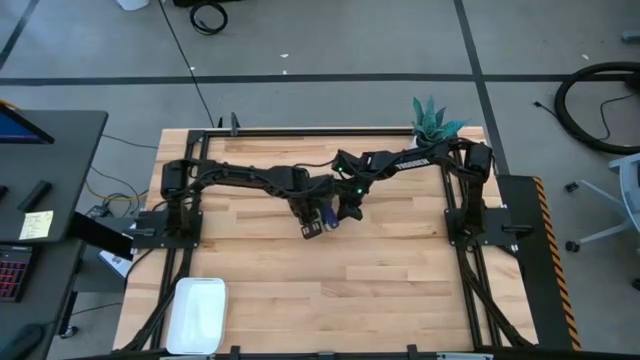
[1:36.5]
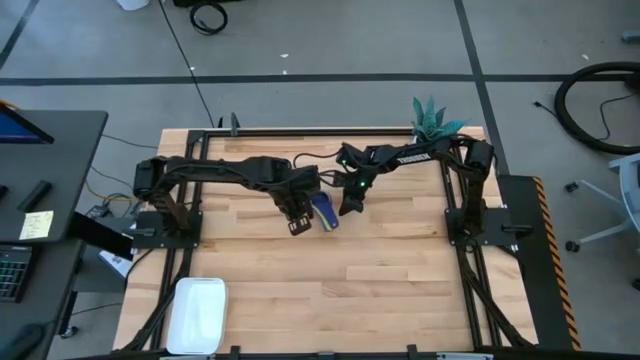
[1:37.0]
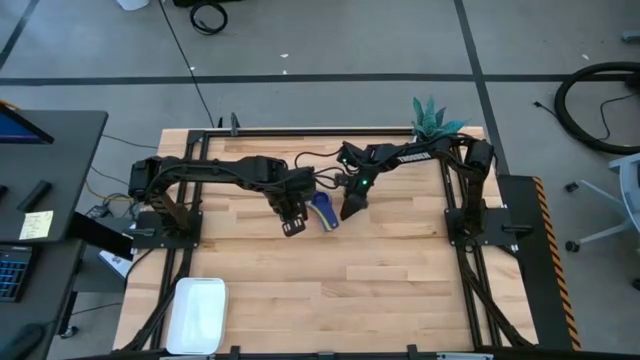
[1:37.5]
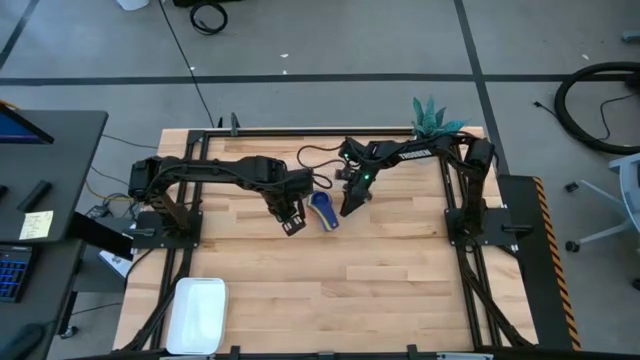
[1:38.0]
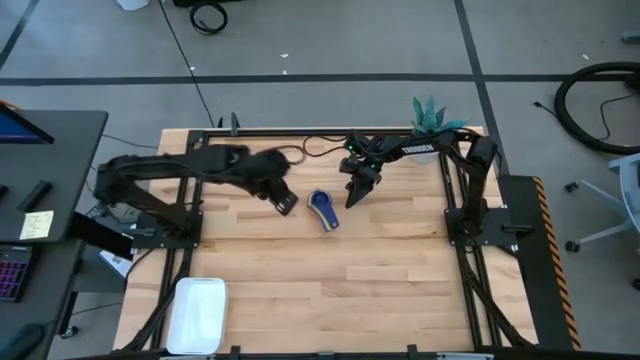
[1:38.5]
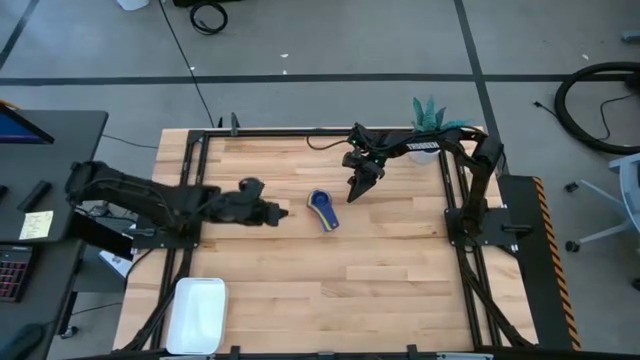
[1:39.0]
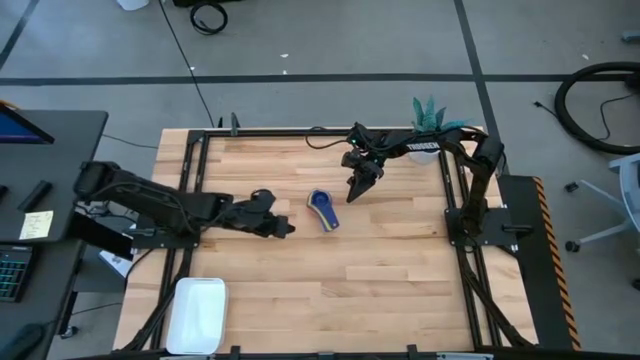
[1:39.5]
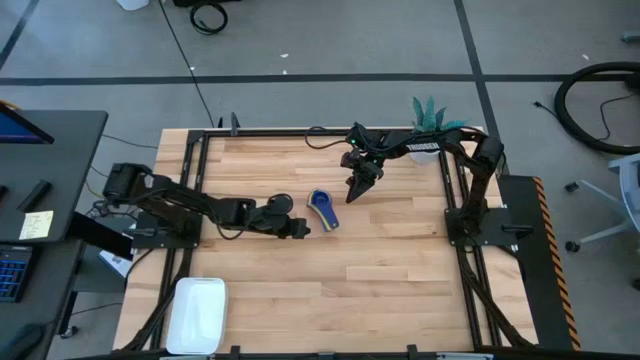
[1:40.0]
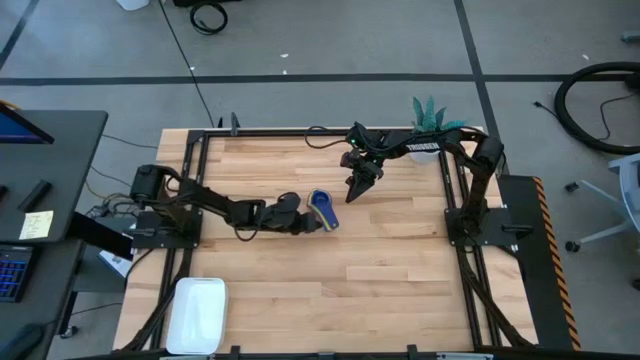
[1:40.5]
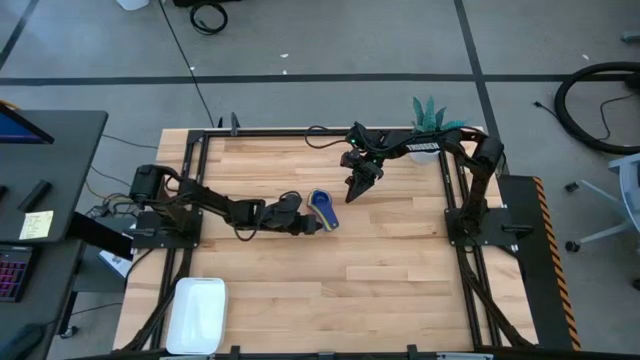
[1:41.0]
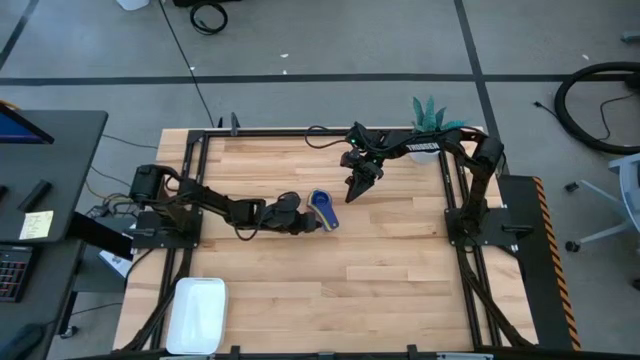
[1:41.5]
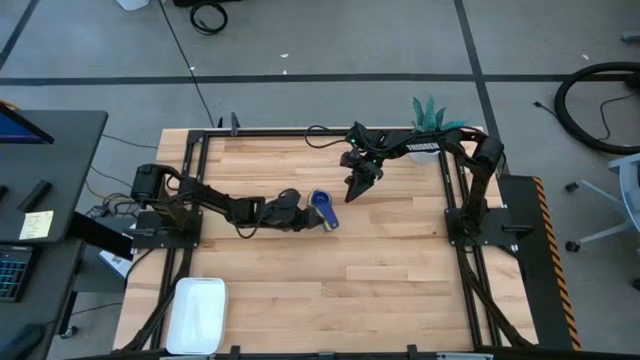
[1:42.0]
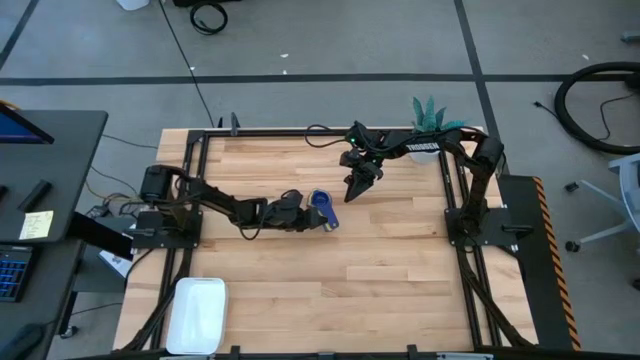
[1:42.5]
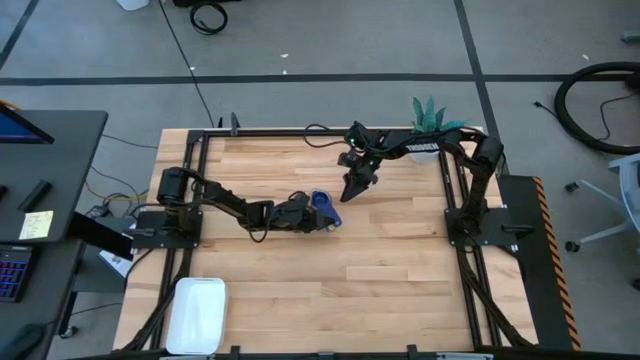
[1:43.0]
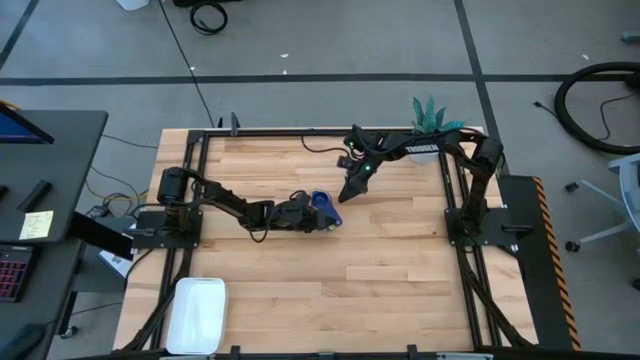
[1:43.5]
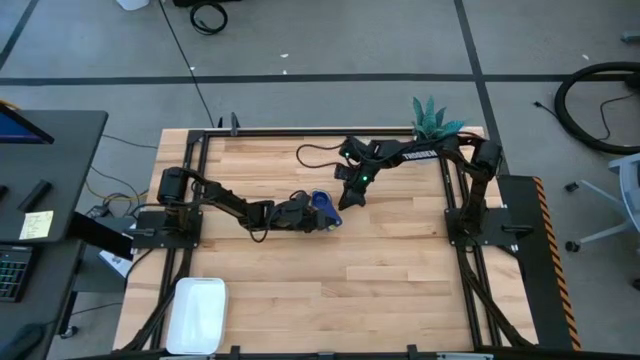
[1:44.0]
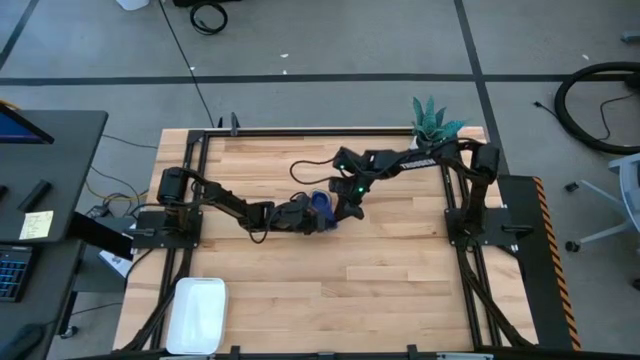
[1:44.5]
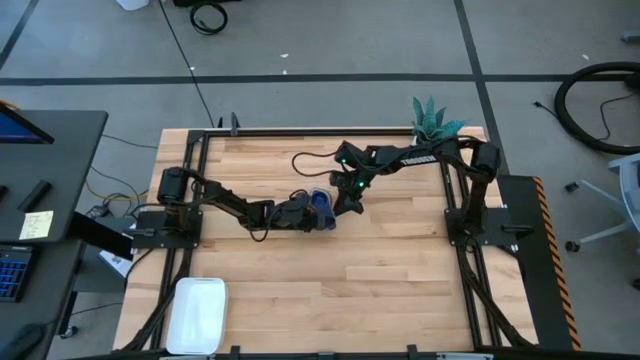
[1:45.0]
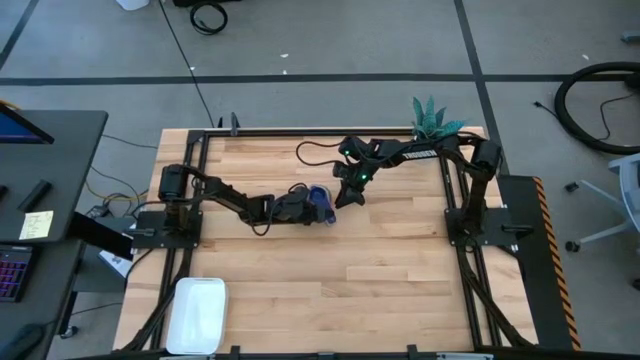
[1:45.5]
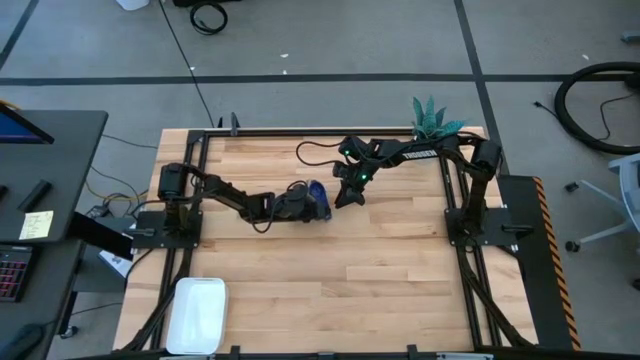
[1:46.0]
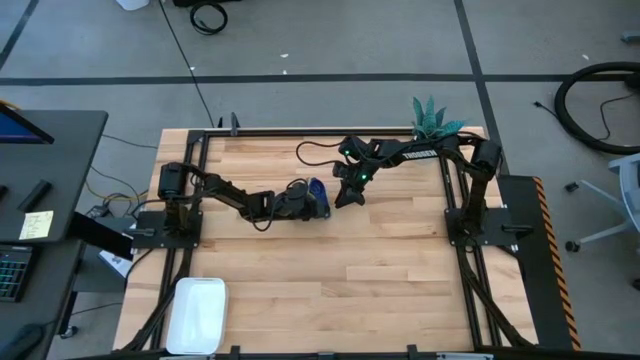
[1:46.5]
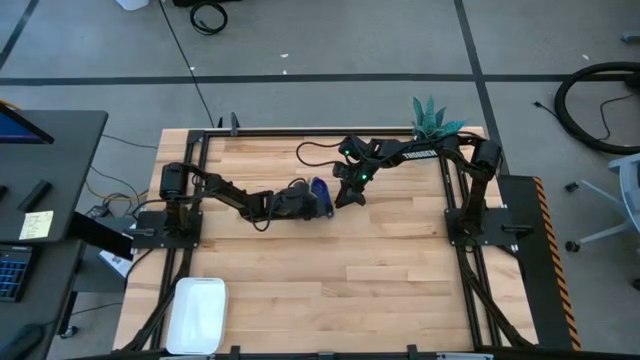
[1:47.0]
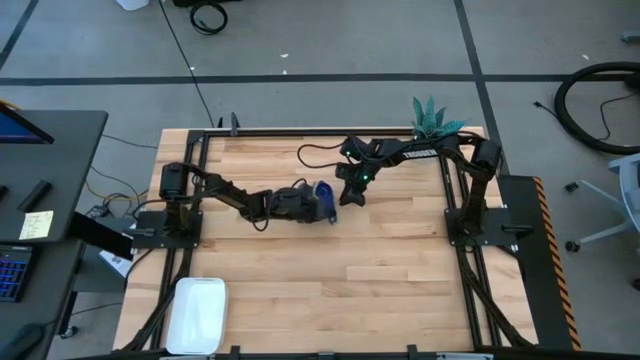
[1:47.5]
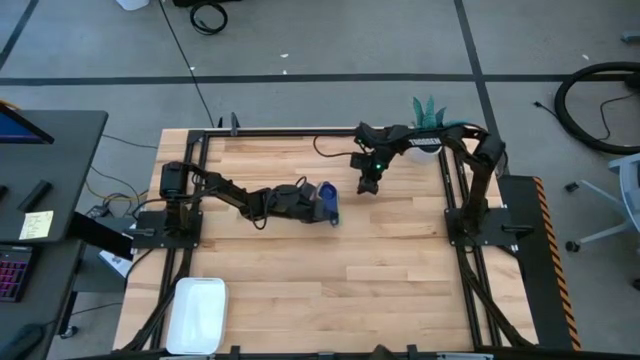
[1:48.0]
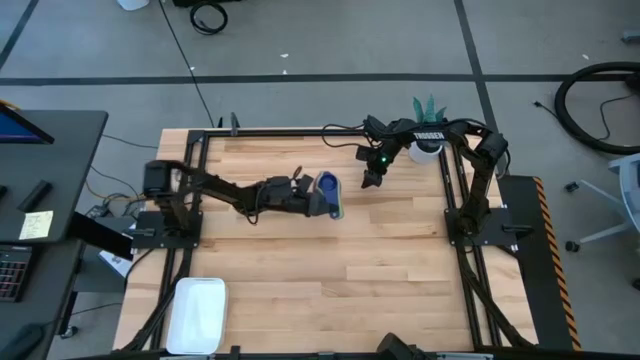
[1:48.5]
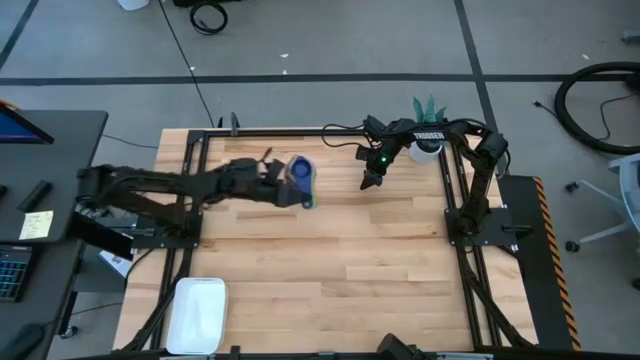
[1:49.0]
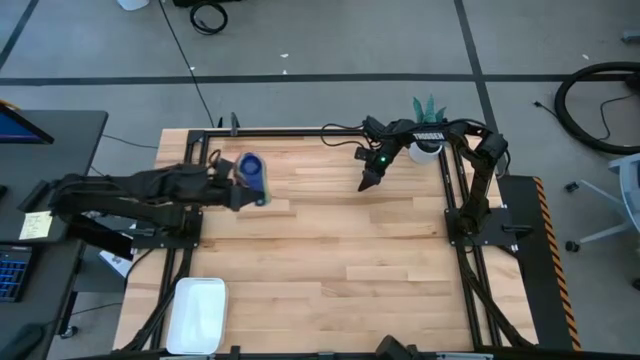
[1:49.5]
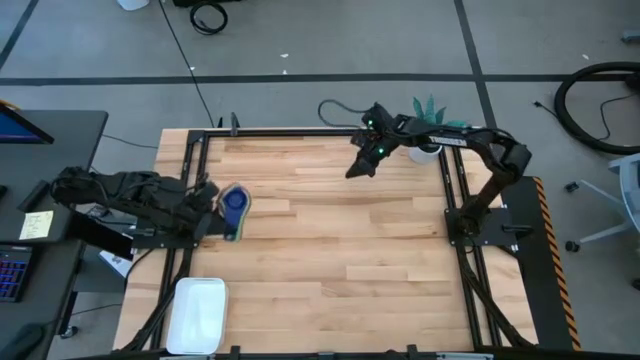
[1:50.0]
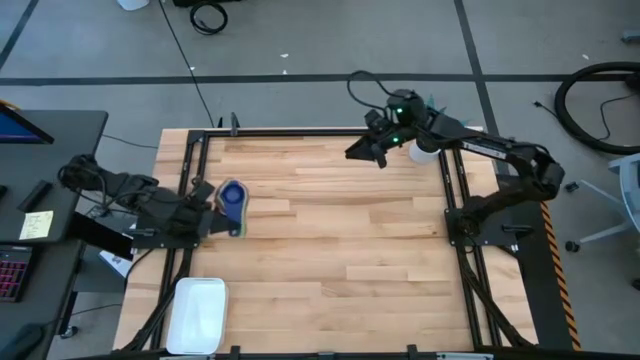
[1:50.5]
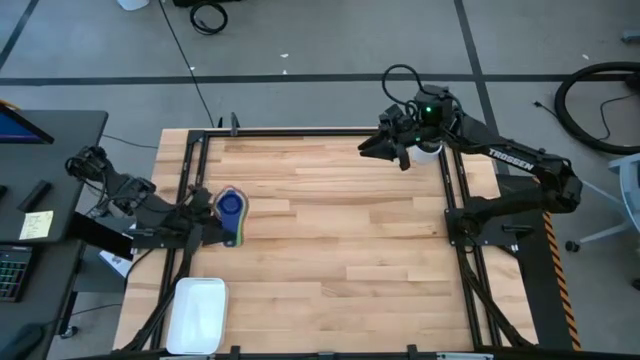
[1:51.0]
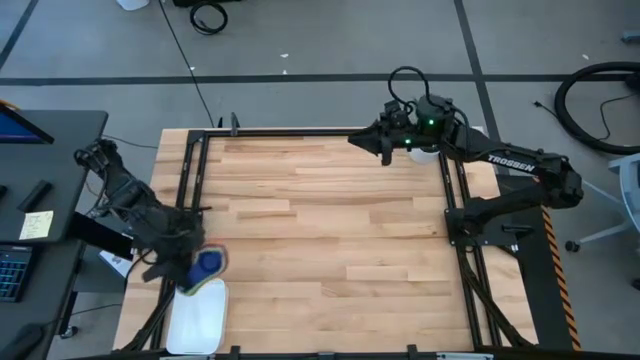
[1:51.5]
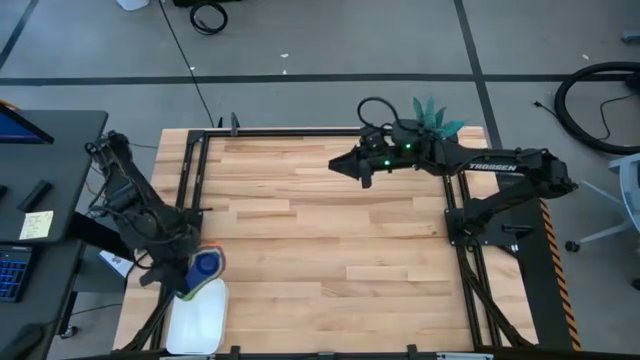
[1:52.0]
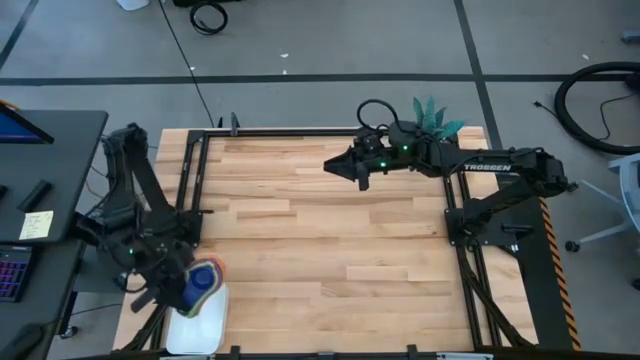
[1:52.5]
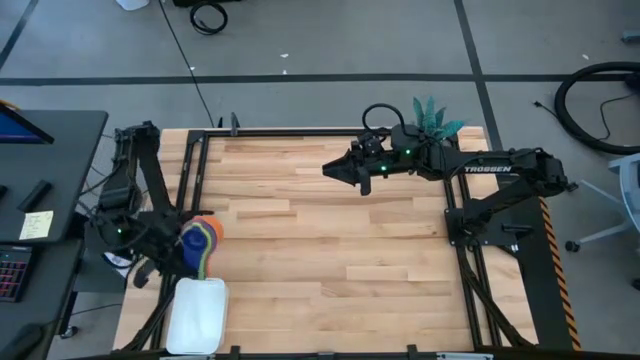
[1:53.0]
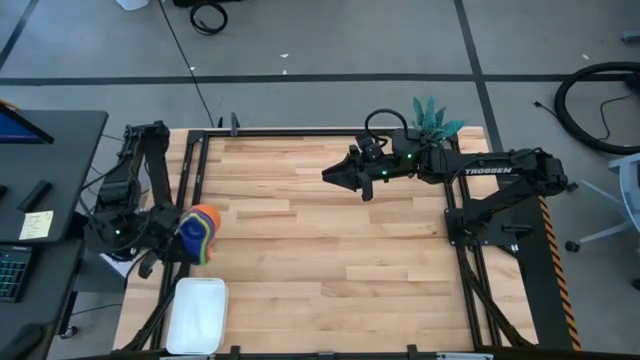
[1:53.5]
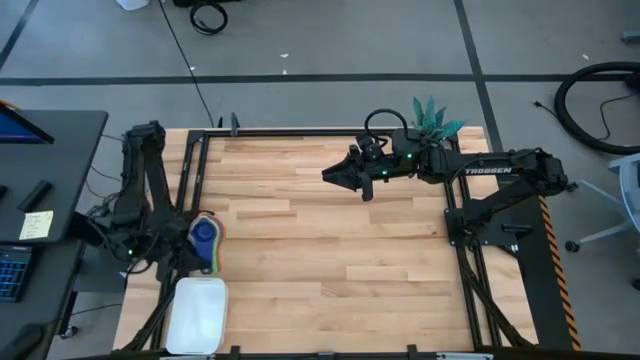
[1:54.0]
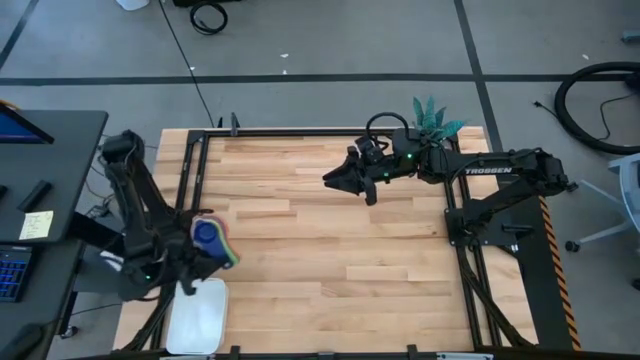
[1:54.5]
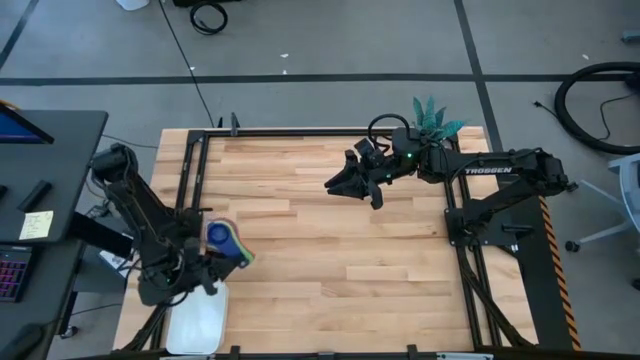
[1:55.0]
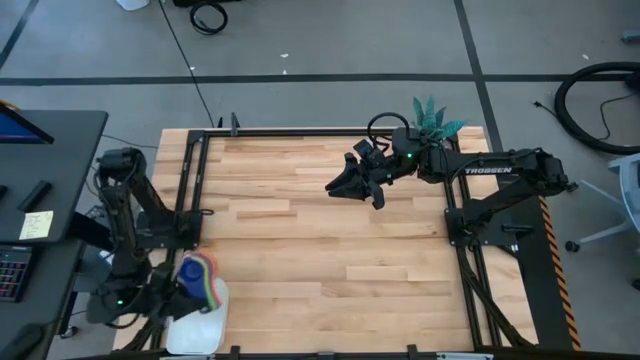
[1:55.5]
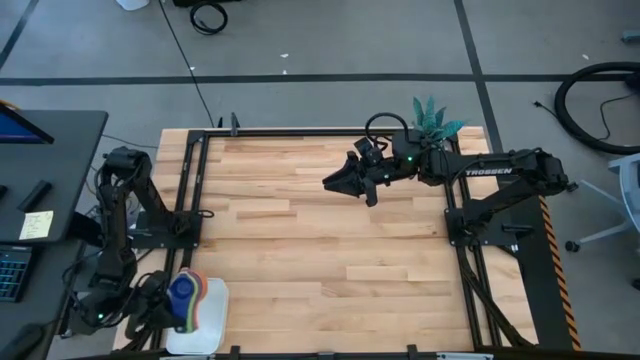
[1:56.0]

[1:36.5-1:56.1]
Task: Nest measuring cups in basket
Put the nested measuring cups into the white bin

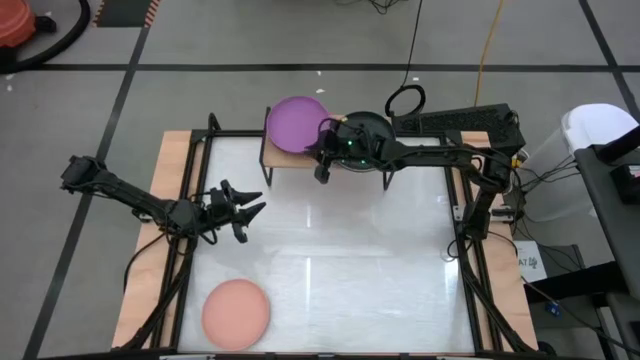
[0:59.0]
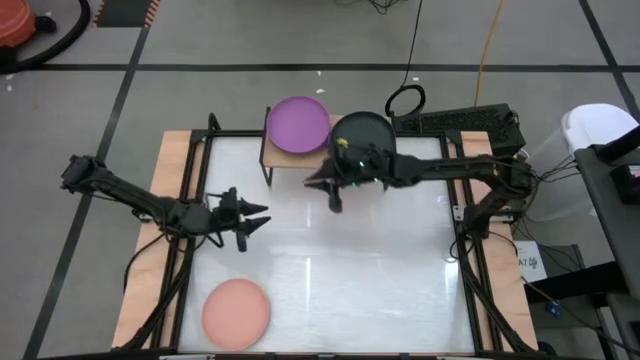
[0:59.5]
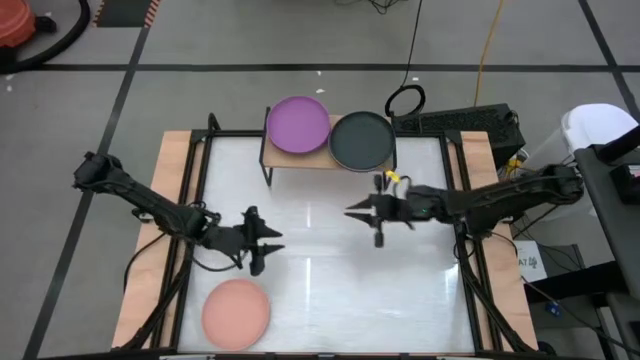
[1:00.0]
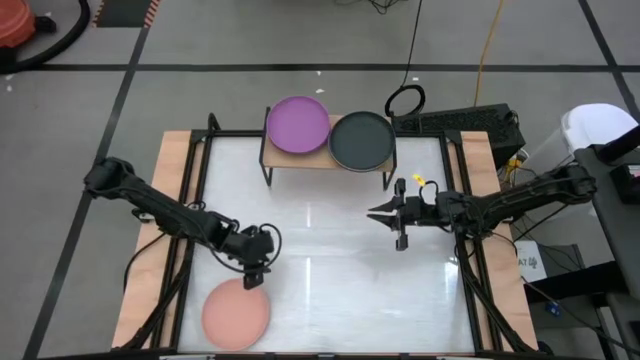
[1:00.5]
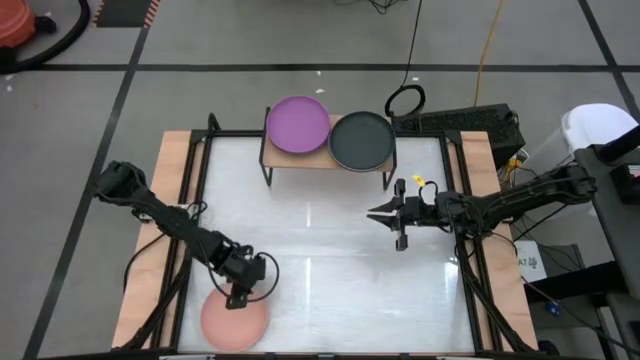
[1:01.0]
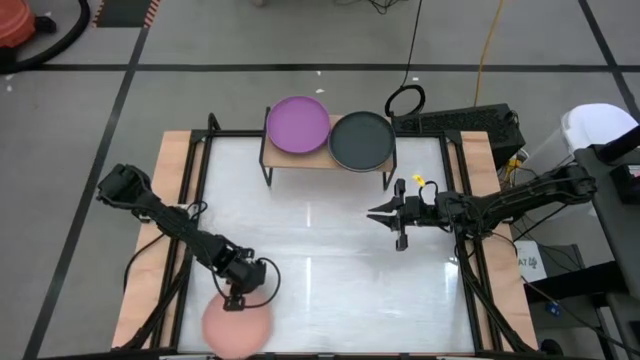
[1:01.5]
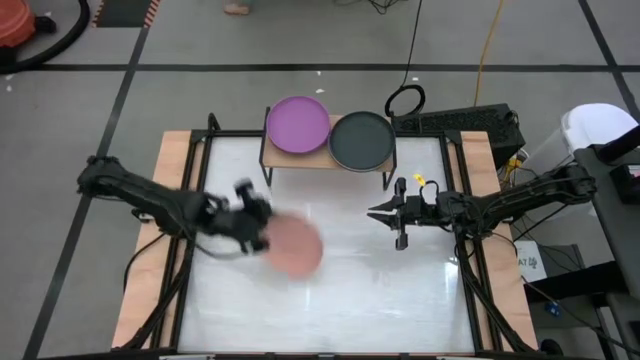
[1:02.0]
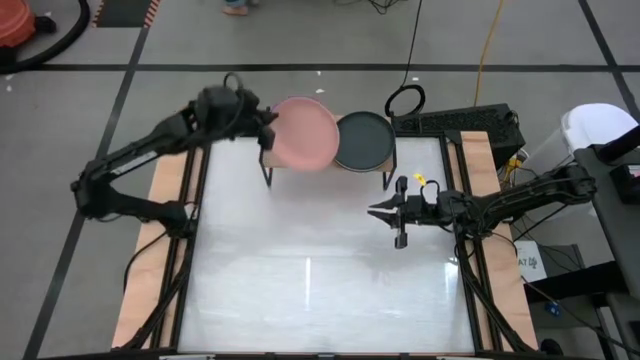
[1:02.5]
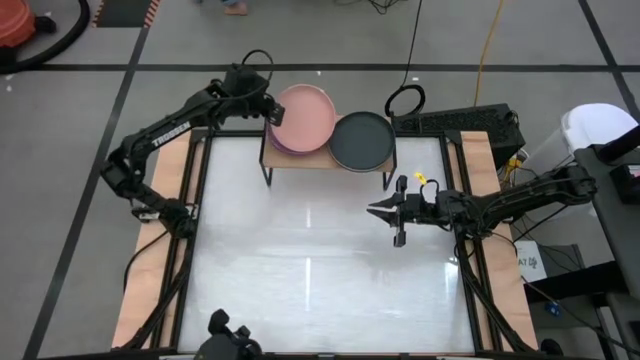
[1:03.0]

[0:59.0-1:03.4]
Task: Place and stack plates onto a shelf
Stack the light orange plate on top of the purple plate on the shelf
